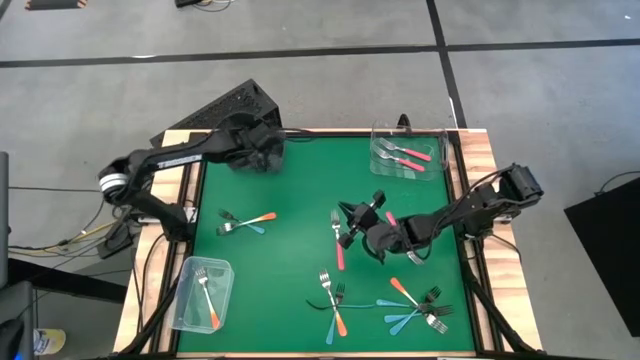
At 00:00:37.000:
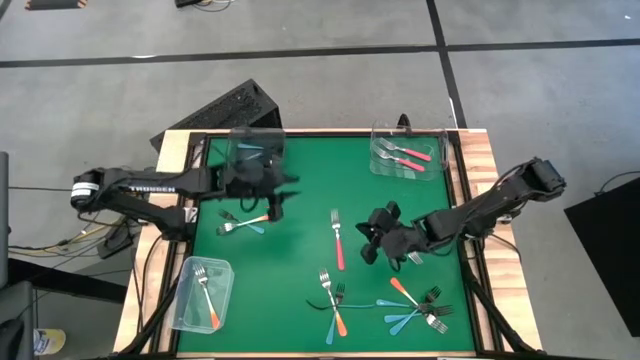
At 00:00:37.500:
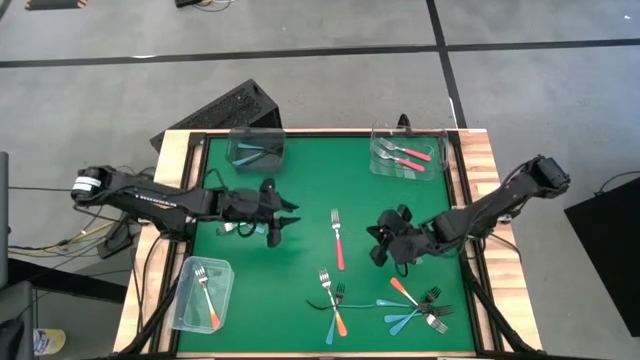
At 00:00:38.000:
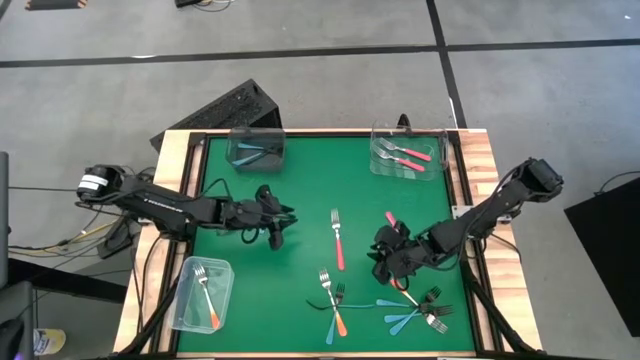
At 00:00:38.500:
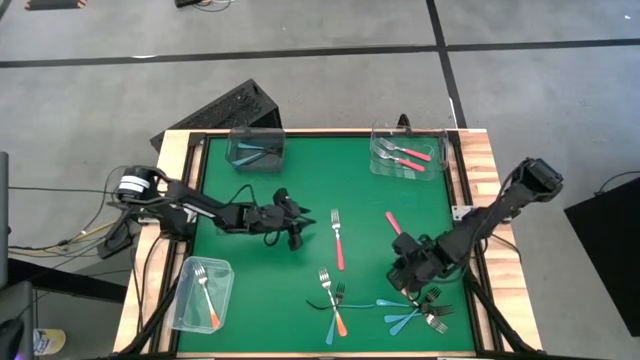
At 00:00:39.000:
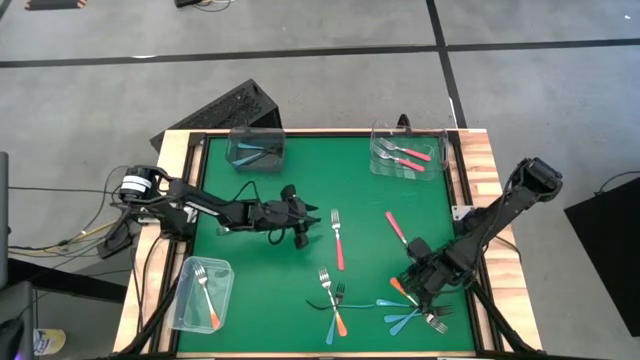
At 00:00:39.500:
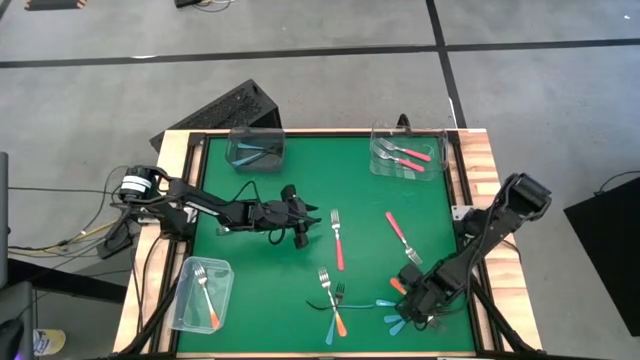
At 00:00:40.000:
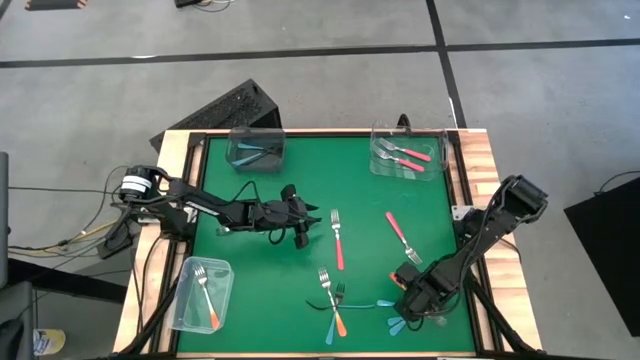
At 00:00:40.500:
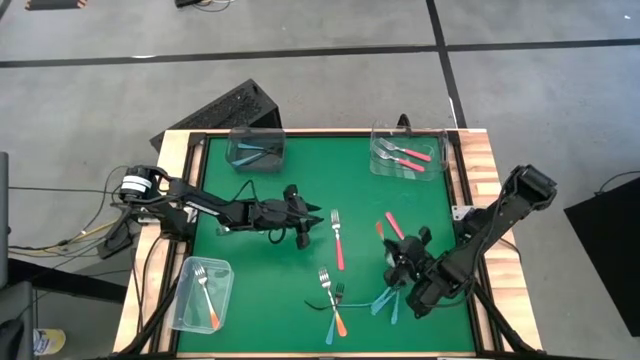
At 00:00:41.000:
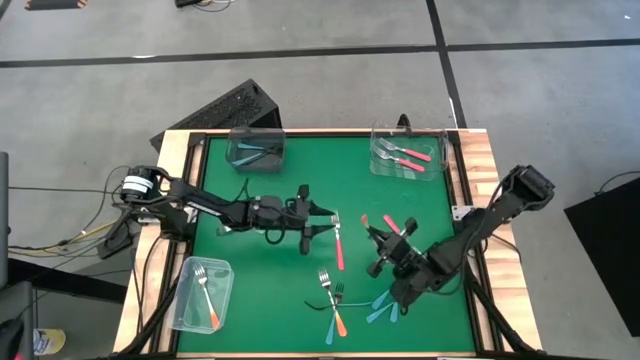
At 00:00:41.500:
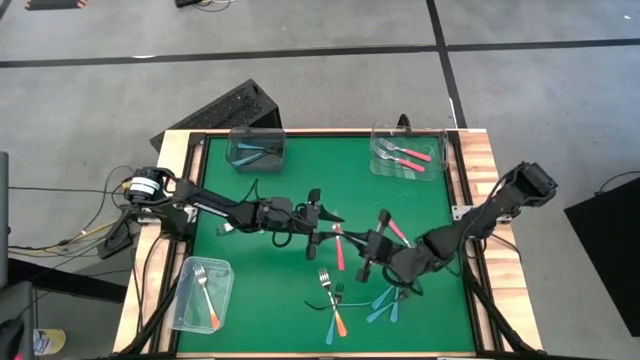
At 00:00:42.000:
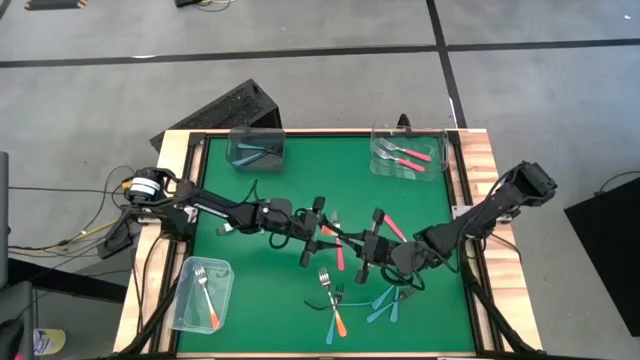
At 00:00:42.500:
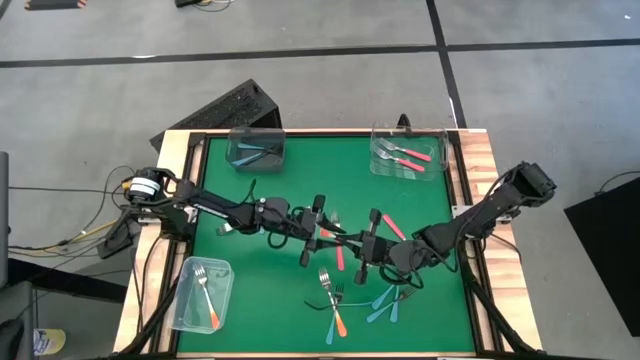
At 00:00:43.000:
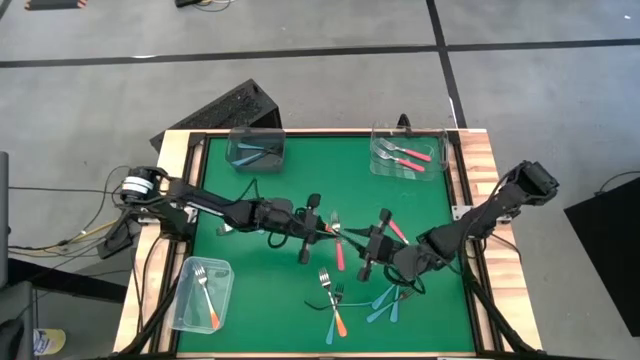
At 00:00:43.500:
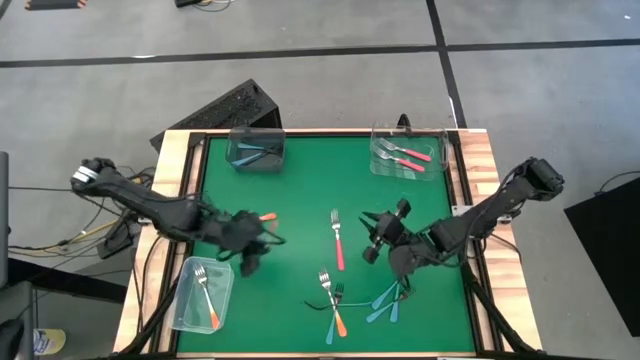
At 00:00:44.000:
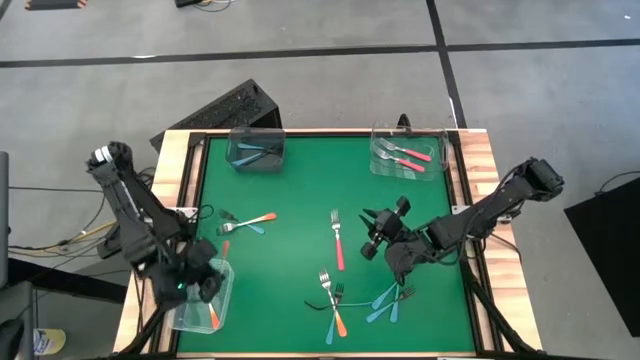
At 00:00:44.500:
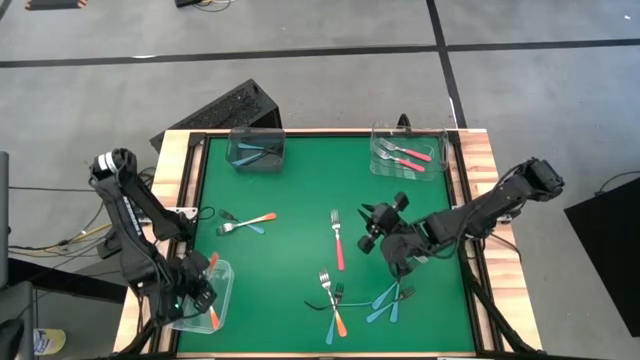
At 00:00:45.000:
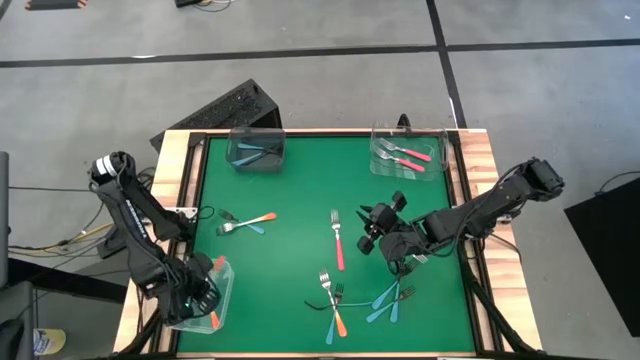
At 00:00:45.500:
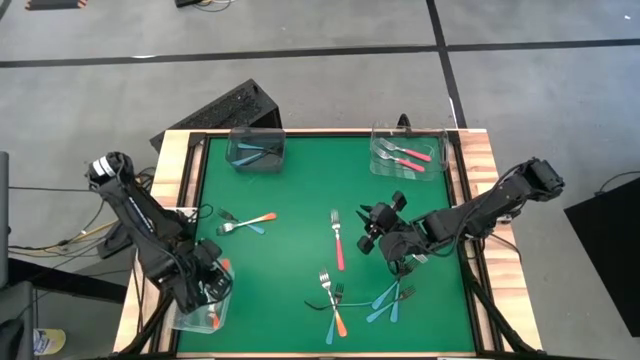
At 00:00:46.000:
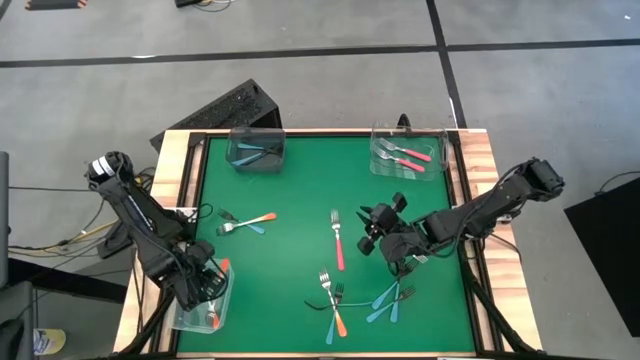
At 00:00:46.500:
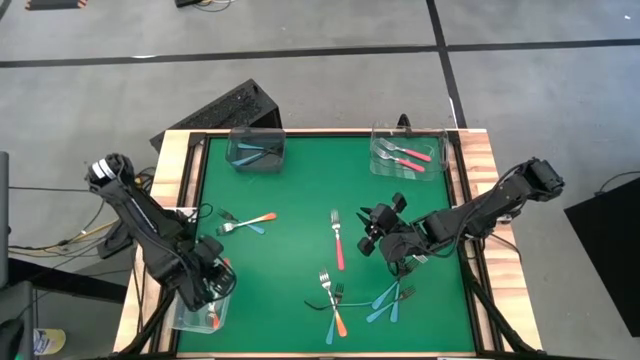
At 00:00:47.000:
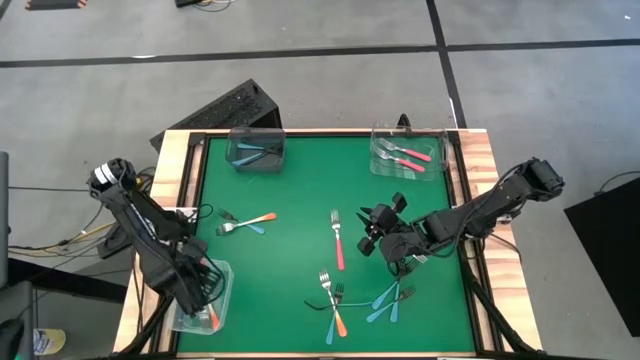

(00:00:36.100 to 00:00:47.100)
Task: Sort silverware by color (type)
Put the orange fork into the white bin

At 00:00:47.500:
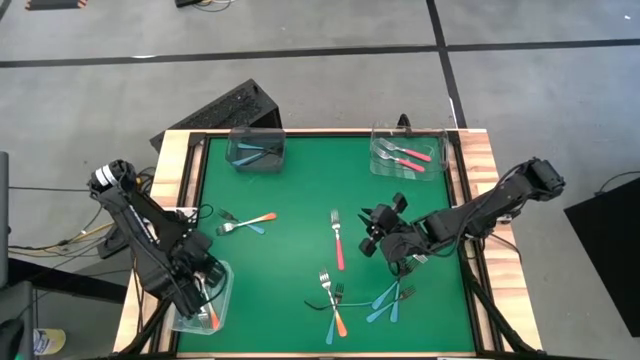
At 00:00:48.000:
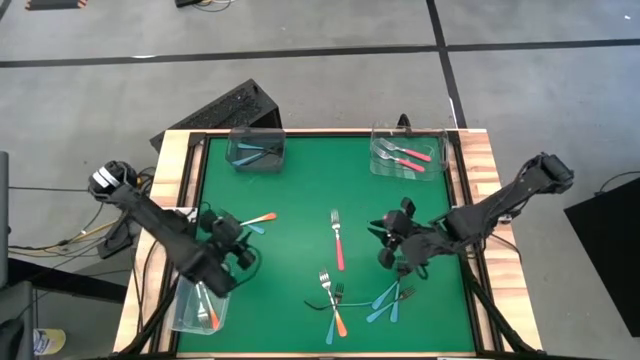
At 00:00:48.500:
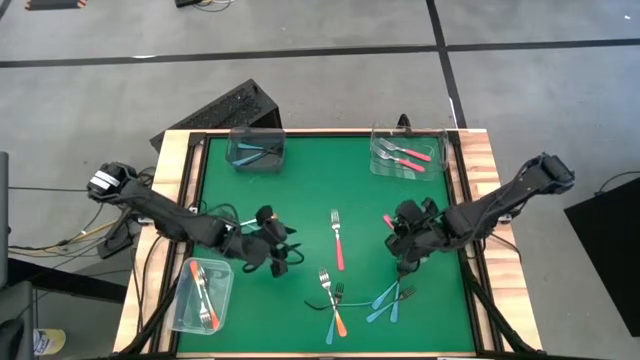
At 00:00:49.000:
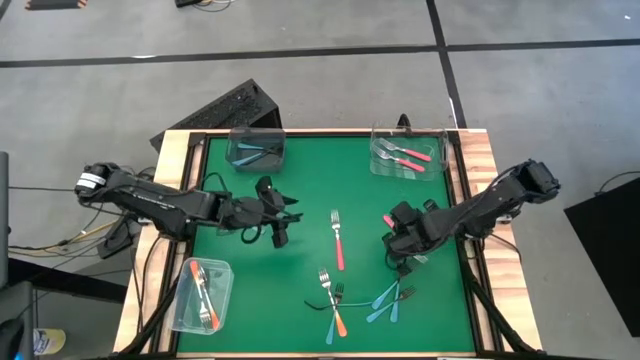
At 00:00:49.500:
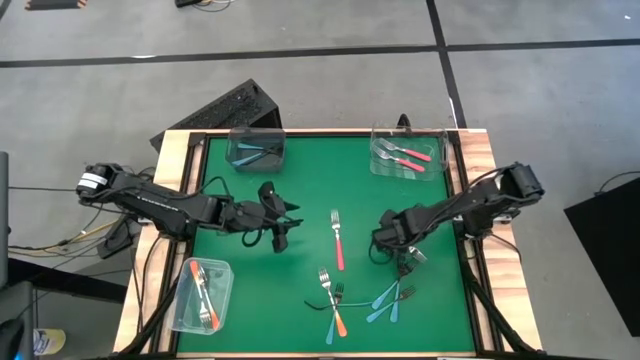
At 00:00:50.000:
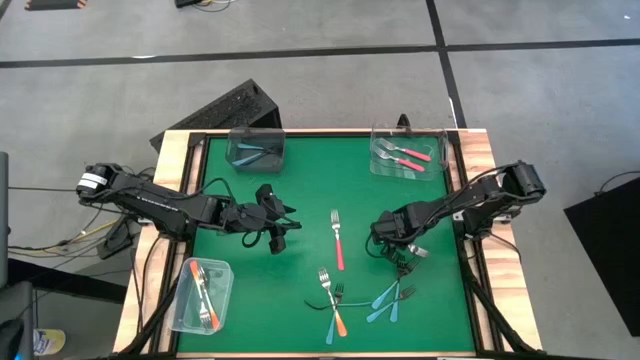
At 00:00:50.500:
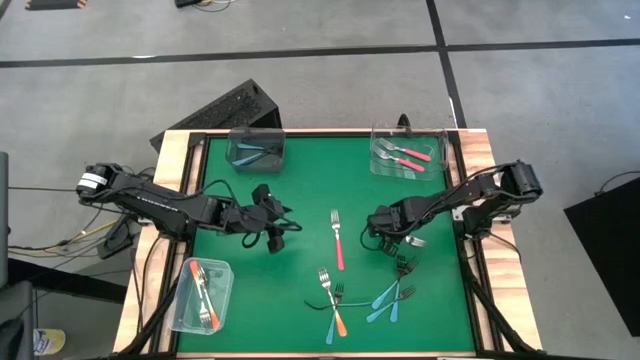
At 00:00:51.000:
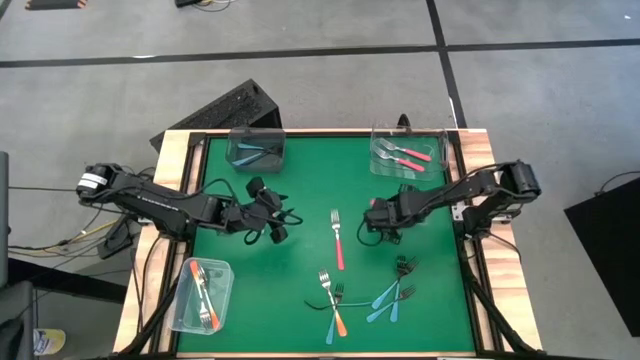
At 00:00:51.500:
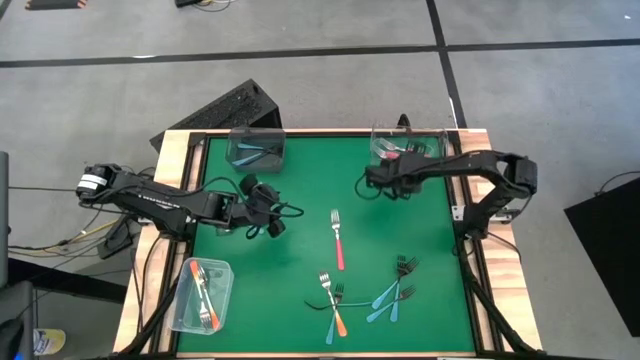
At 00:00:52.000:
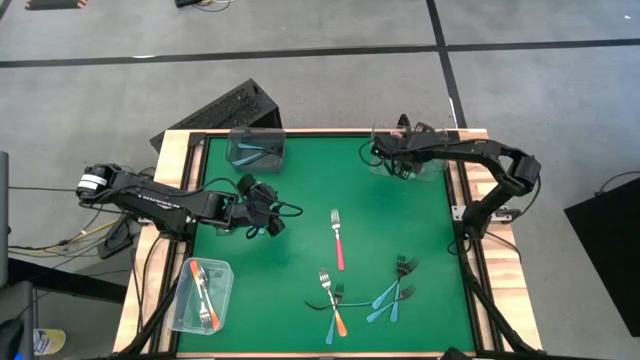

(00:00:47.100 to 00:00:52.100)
Put the pink fork into the transparent bin

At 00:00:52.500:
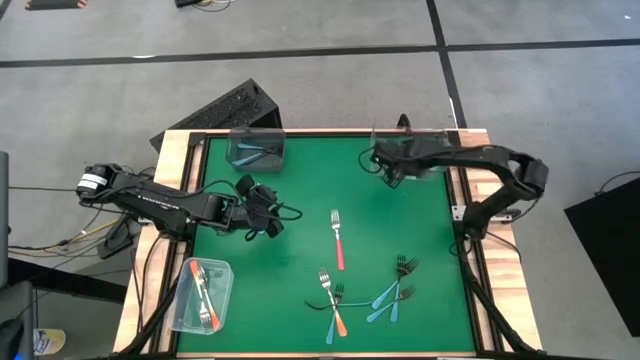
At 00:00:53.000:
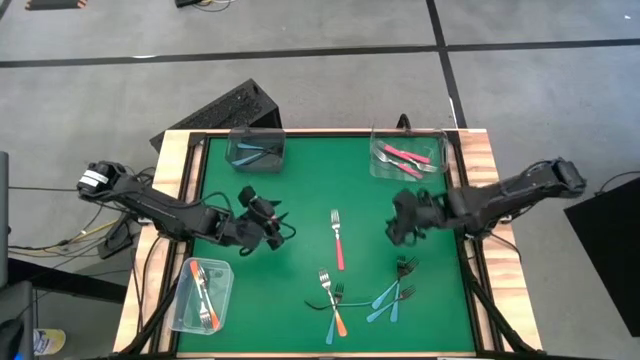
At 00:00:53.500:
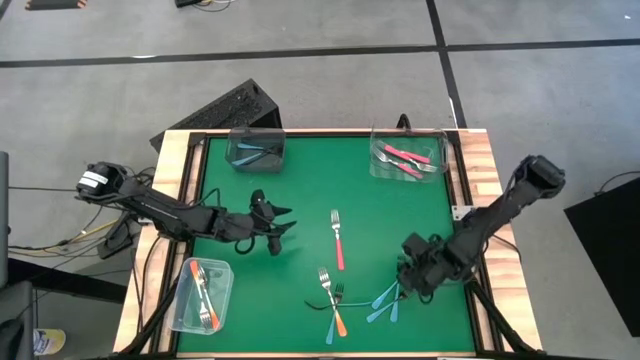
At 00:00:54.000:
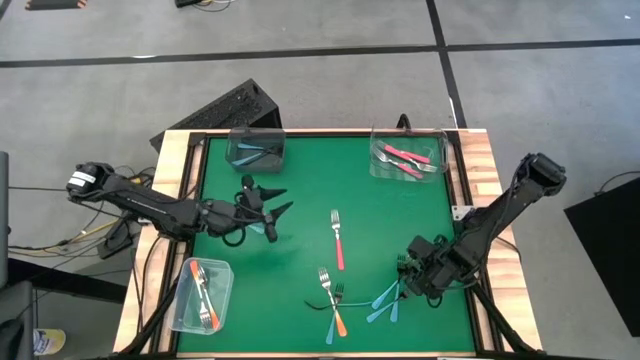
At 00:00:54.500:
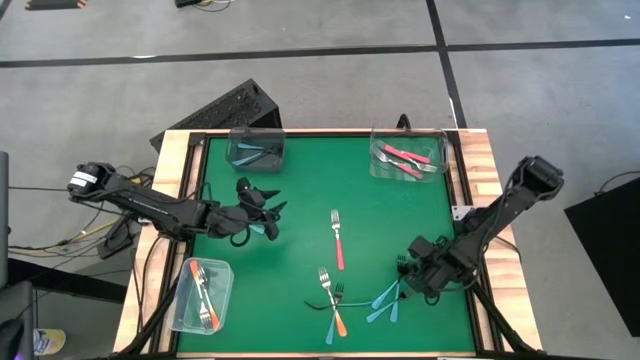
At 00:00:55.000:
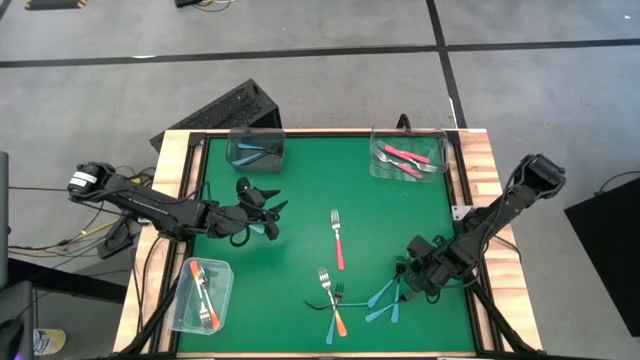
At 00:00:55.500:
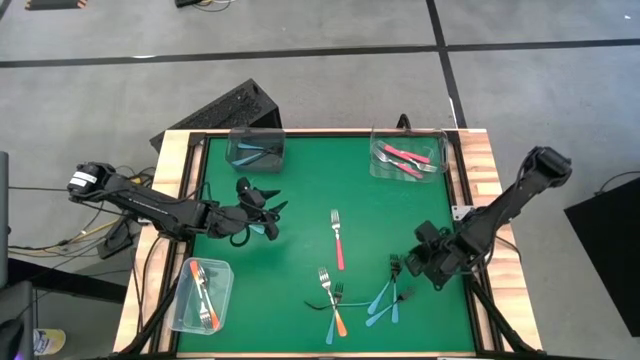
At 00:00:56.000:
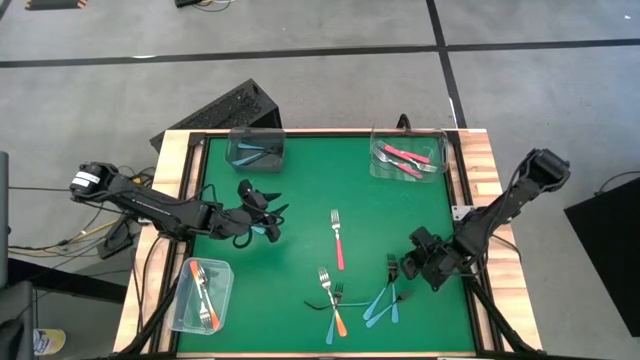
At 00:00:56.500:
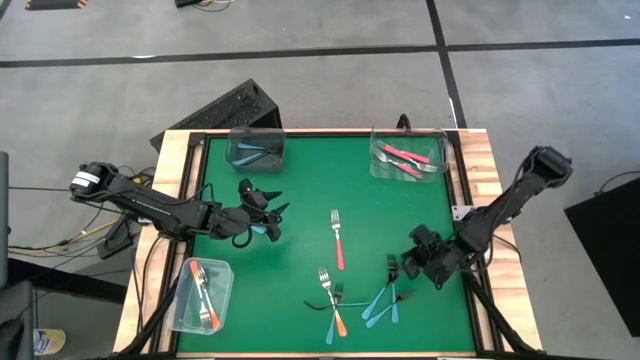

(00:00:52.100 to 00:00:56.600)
Put the blue fork into the black bin
